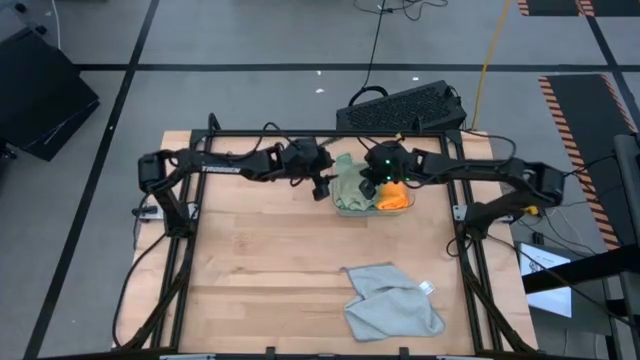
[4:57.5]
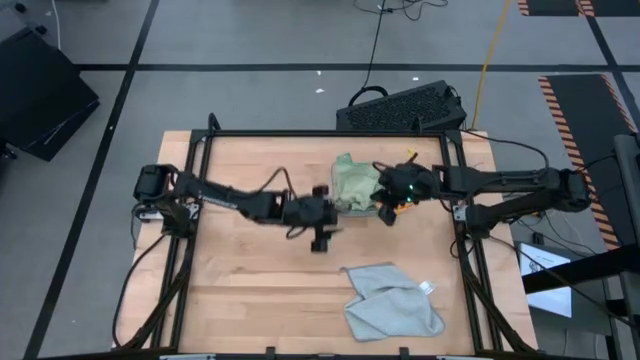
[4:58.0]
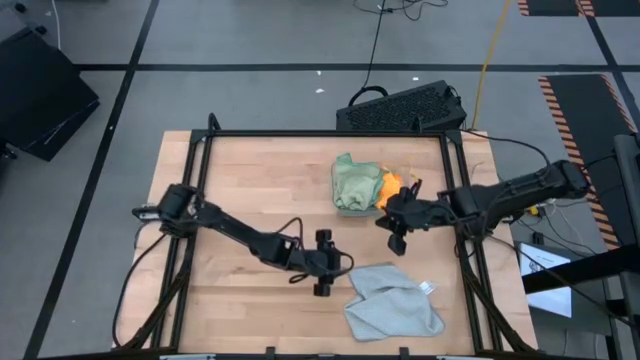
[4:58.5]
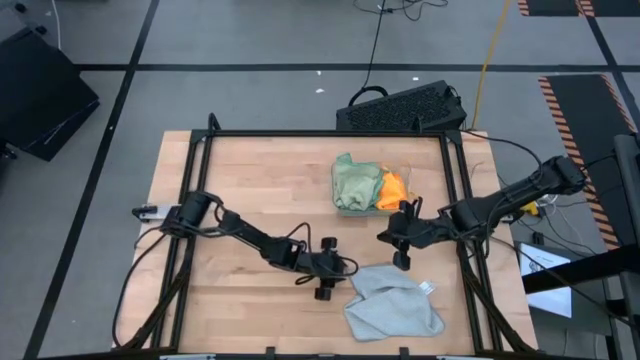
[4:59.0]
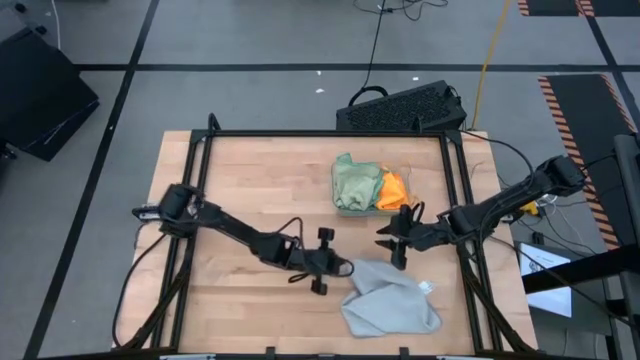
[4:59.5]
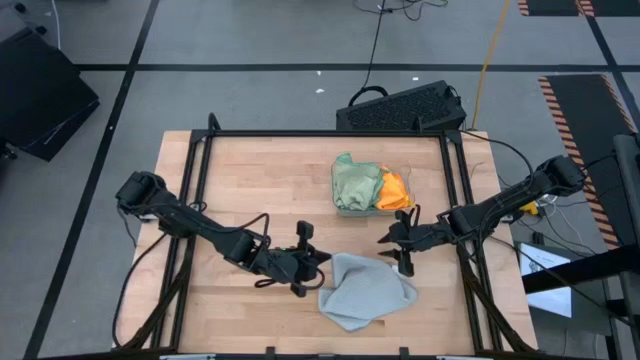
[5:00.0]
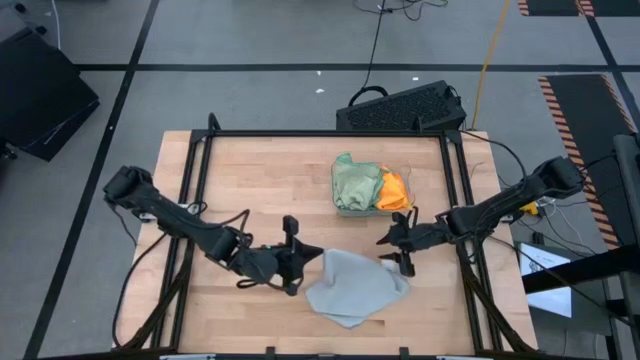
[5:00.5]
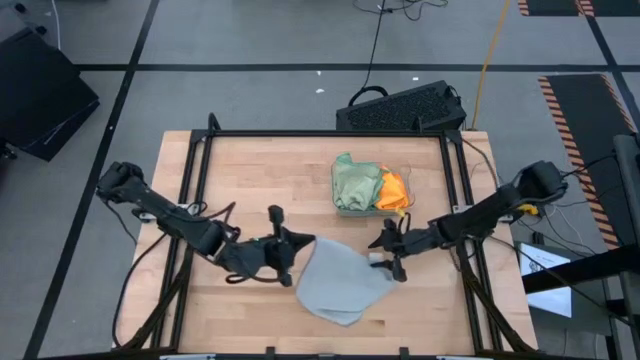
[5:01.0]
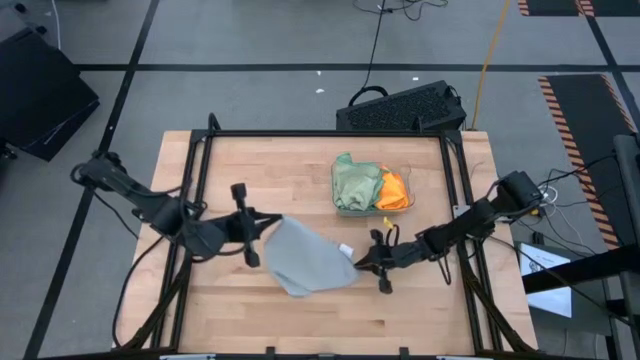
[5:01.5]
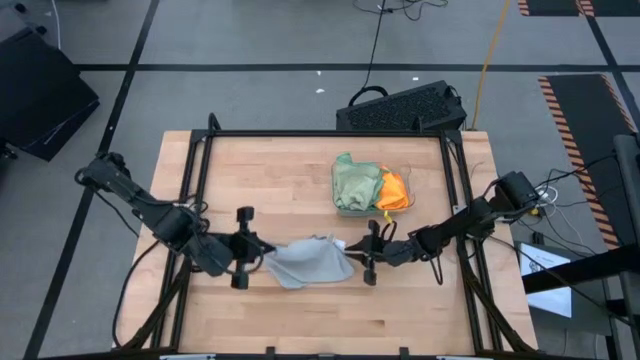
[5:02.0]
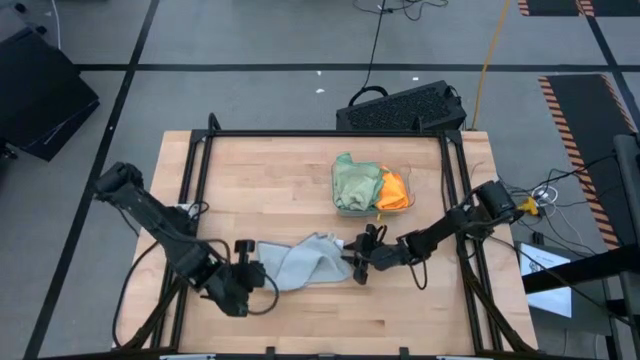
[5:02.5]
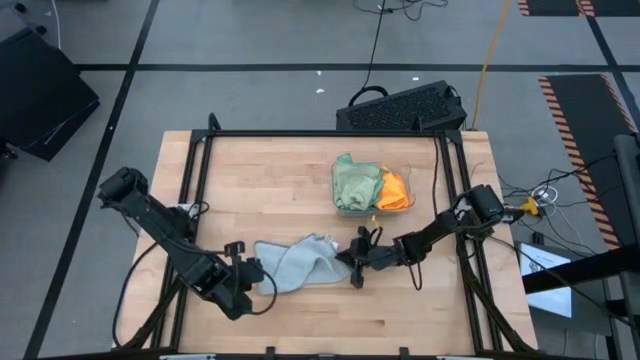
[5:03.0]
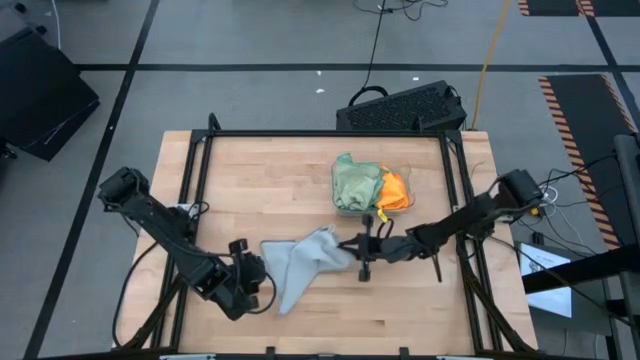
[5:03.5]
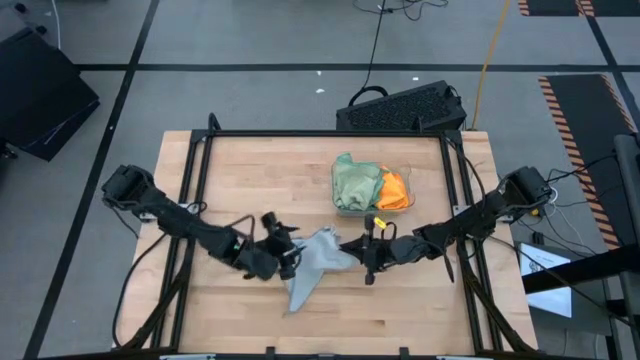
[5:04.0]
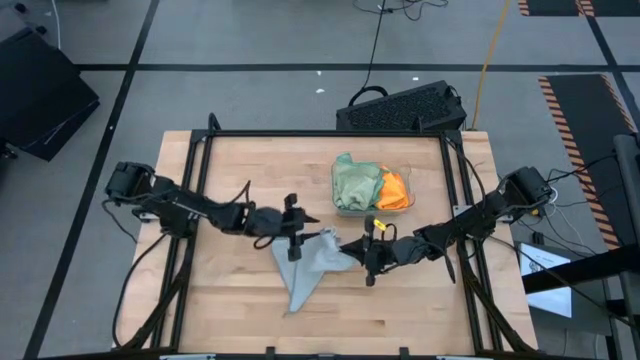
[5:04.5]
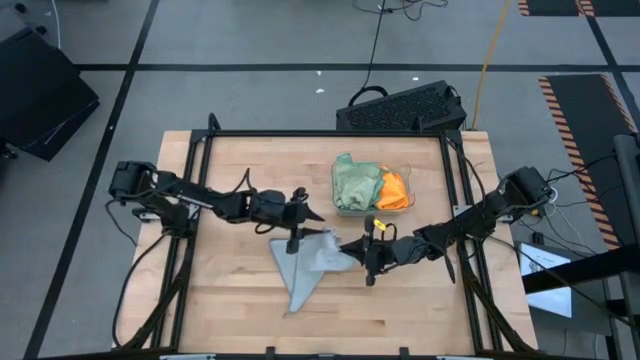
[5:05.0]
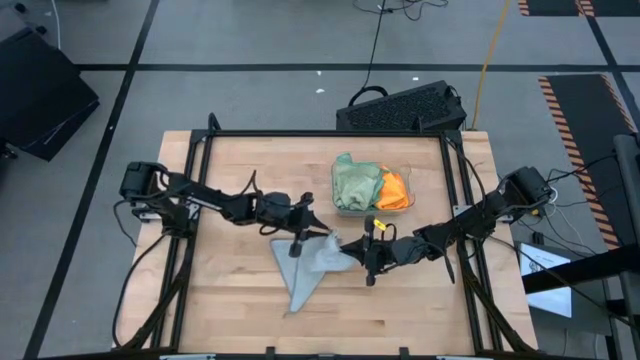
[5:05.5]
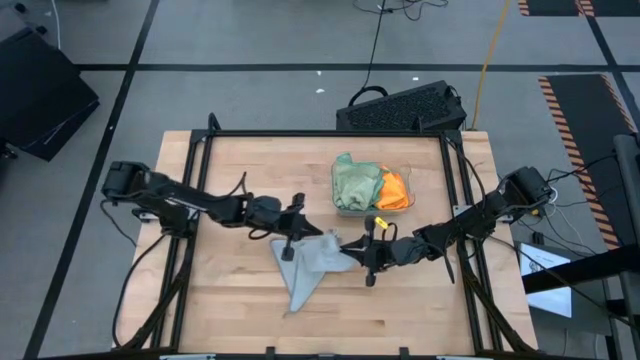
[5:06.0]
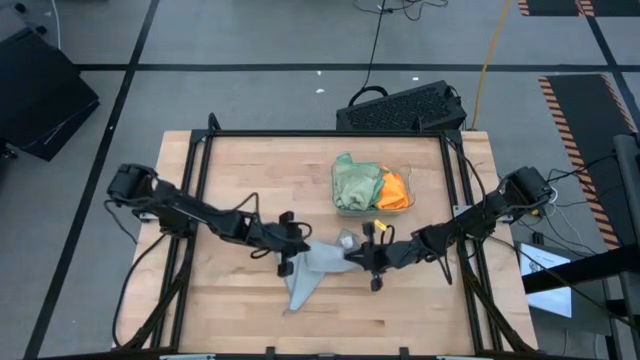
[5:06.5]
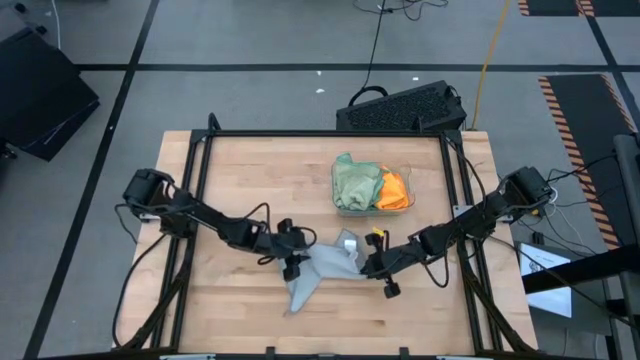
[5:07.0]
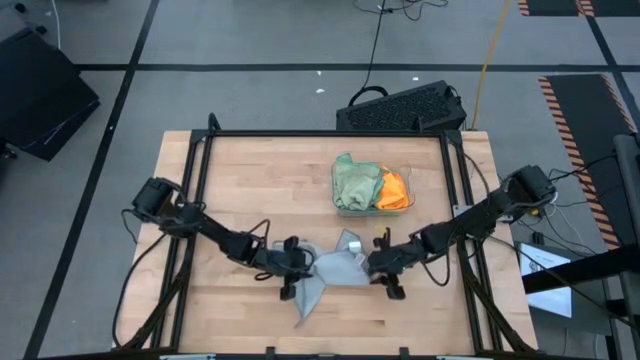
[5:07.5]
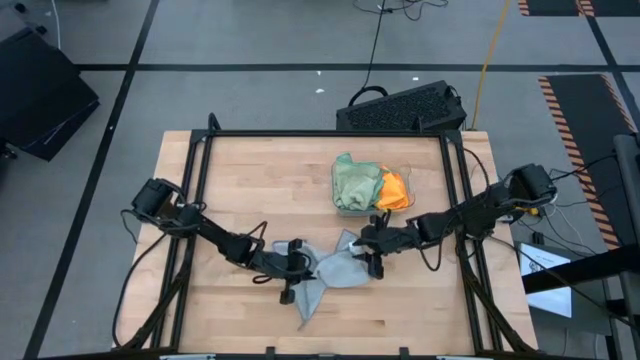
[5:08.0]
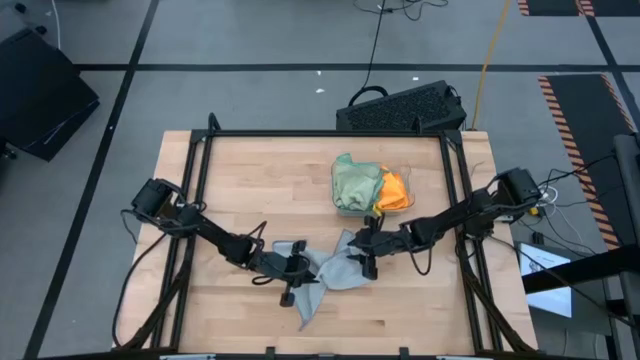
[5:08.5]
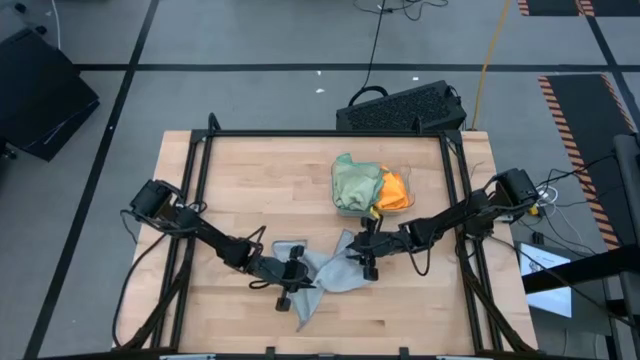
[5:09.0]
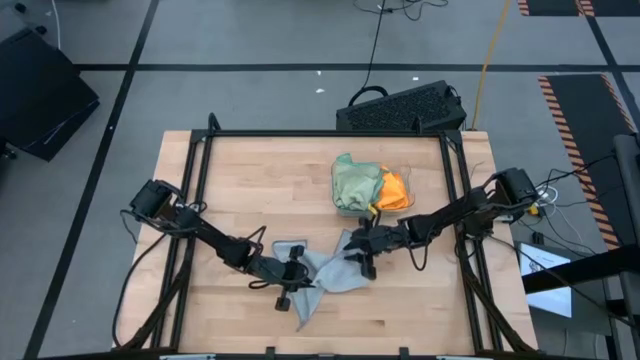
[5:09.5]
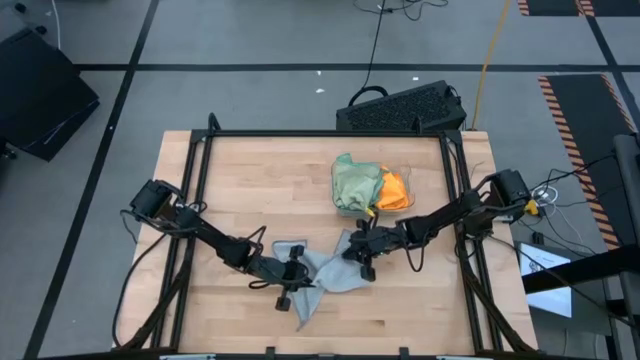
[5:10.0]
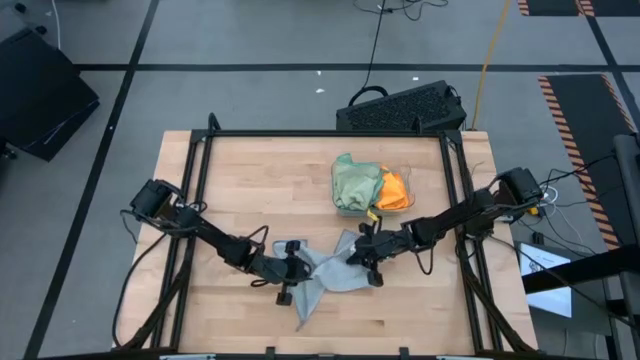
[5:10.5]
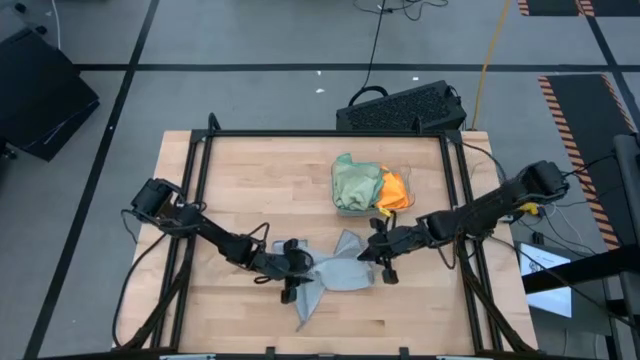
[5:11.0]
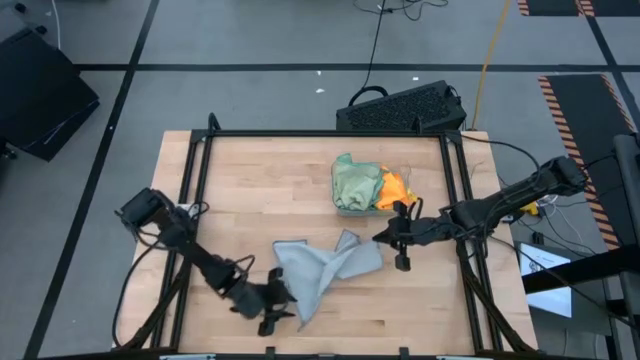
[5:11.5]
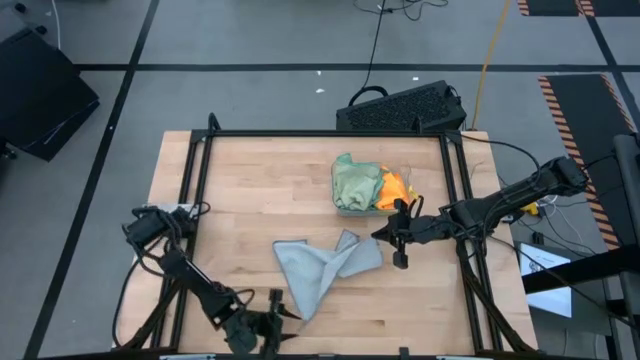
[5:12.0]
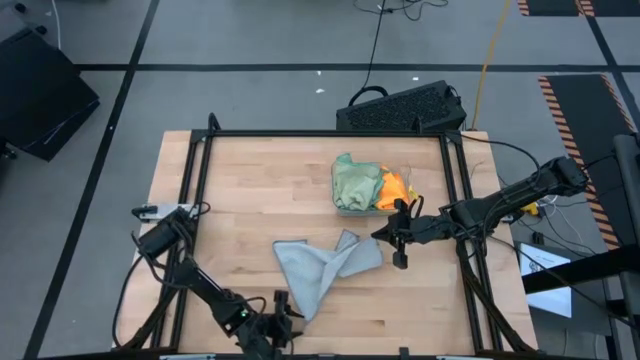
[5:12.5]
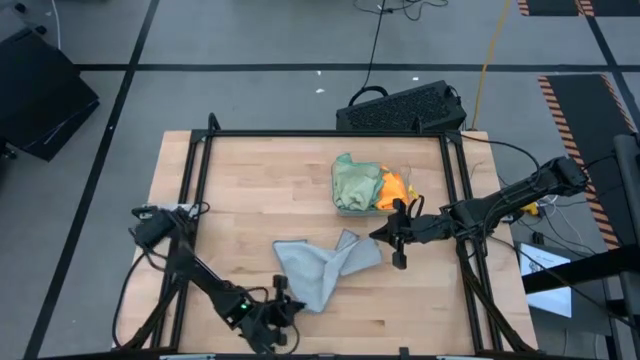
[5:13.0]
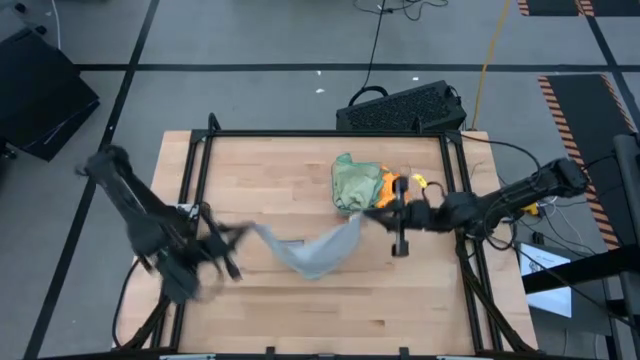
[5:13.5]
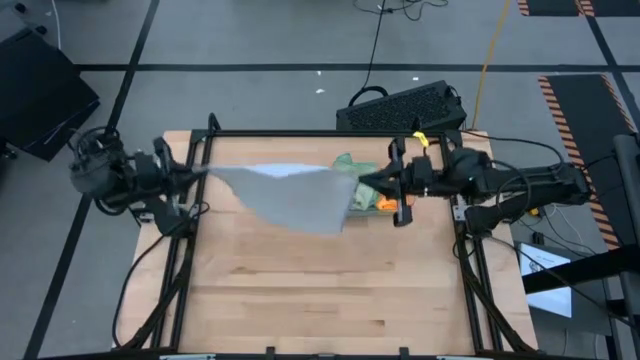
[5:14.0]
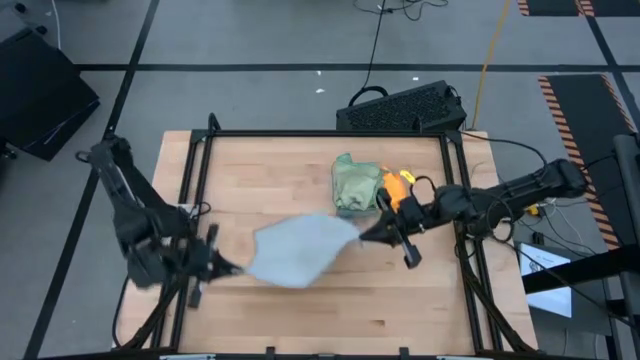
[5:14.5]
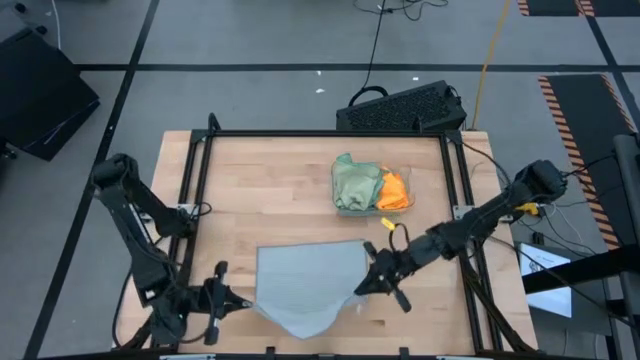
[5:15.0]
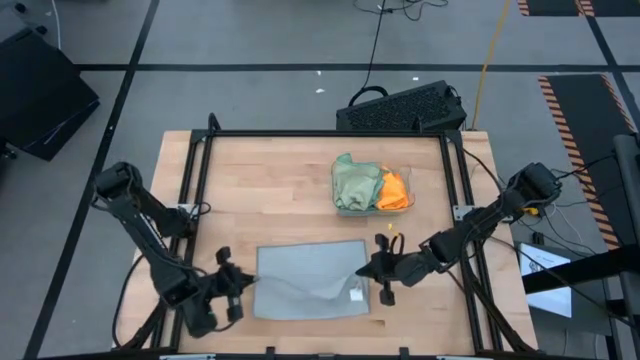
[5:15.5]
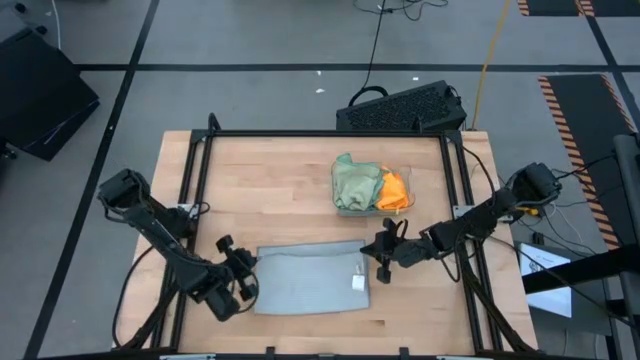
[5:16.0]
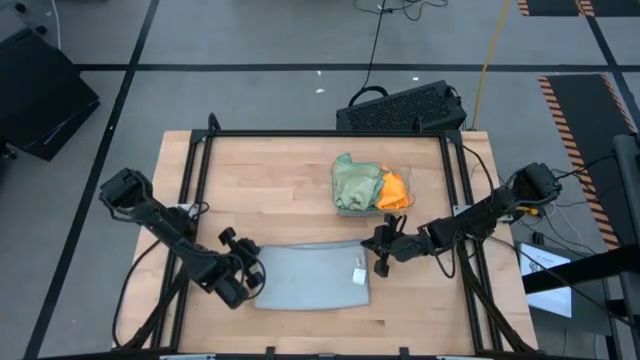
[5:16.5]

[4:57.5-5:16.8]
Task: Fold microfiber towels
Fold the gray microfiber cloth

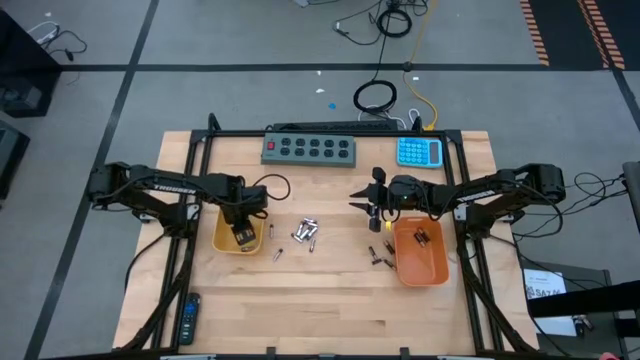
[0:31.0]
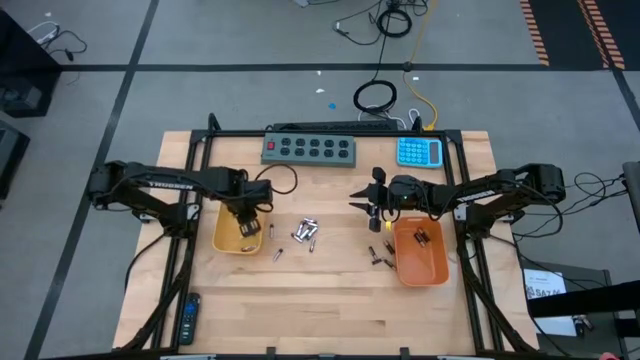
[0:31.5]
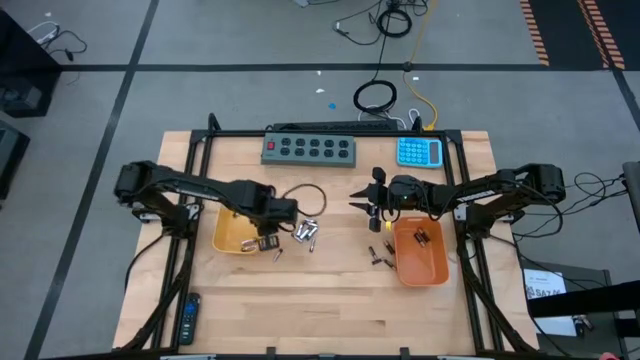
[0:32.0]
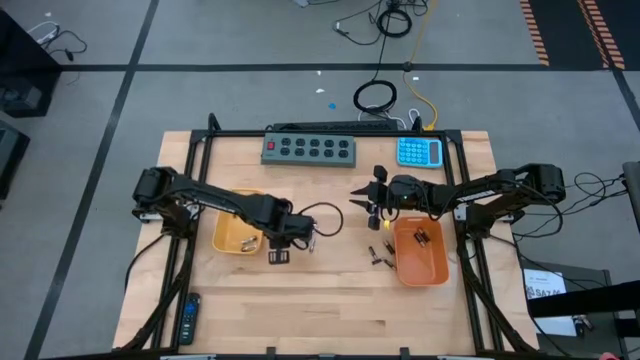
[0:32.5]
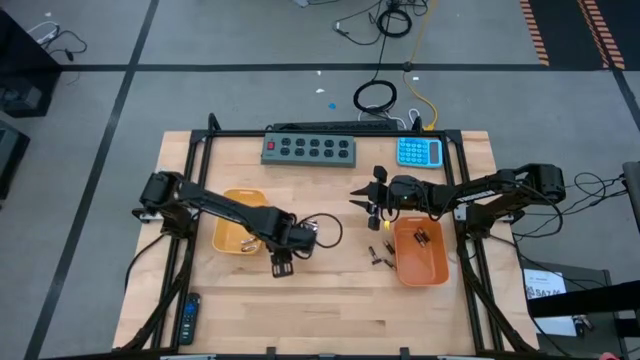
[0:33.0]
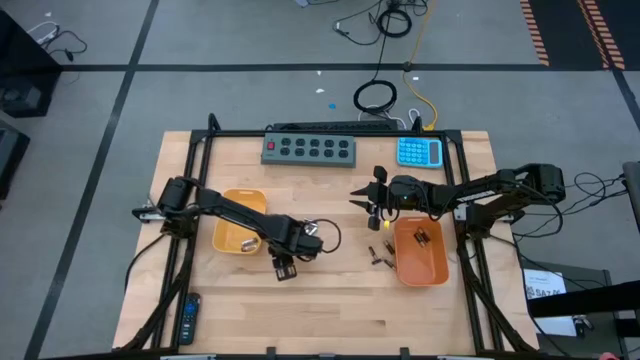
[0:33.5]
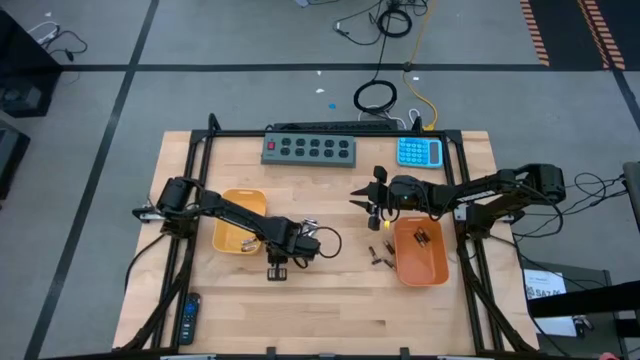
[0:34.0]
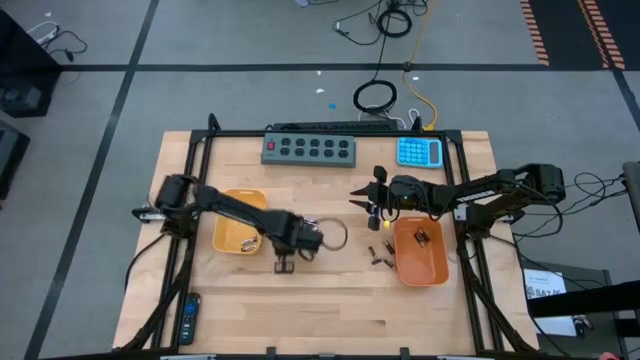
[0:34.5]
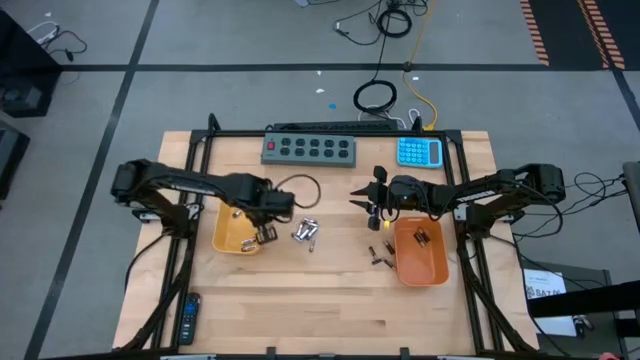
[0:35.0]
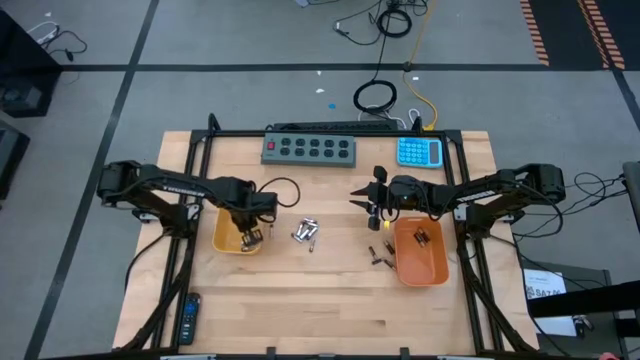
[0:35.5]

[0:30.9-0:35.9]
Task: Sort batteries
Put the silver battery into the yellow bin
